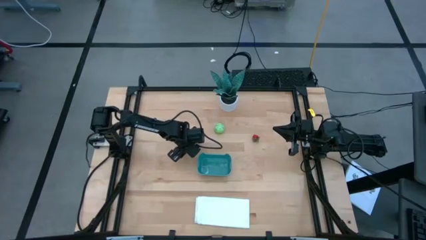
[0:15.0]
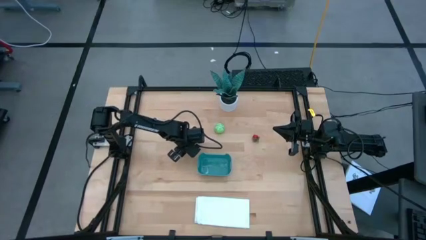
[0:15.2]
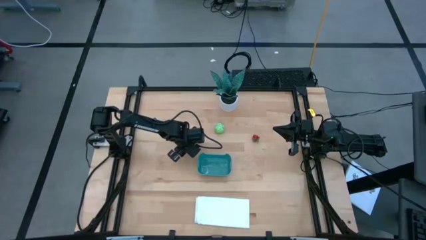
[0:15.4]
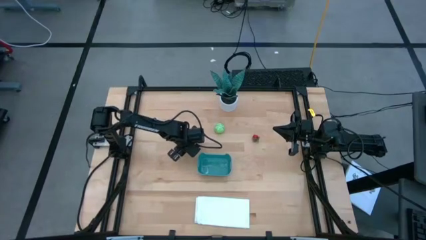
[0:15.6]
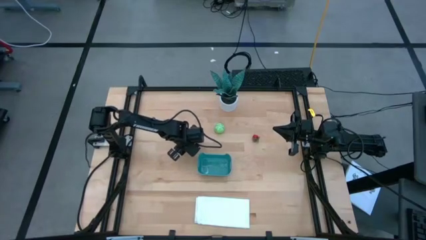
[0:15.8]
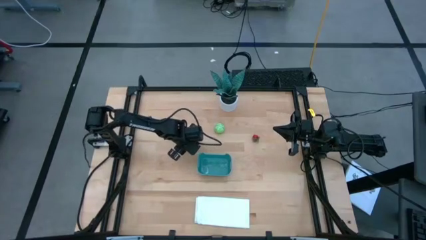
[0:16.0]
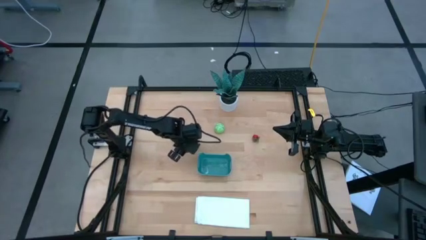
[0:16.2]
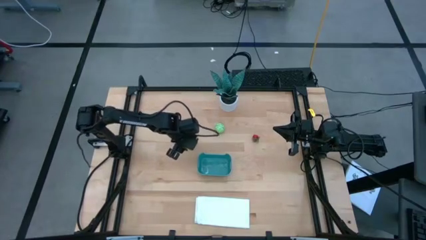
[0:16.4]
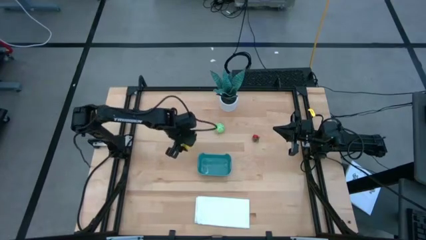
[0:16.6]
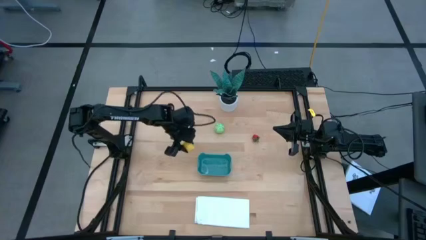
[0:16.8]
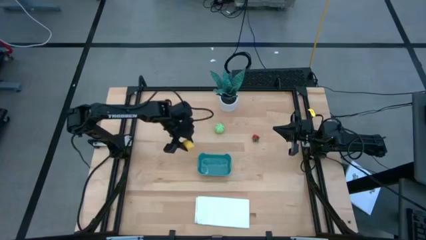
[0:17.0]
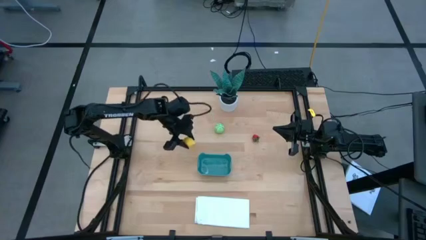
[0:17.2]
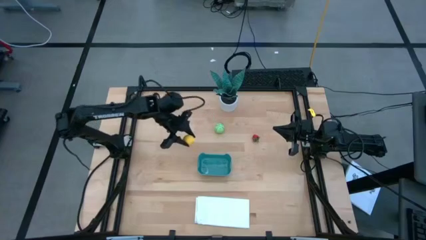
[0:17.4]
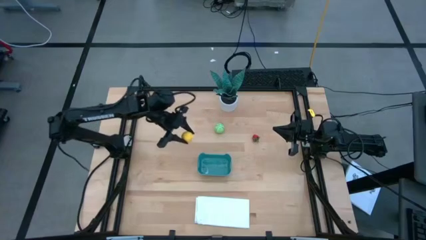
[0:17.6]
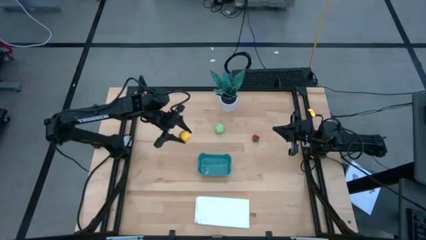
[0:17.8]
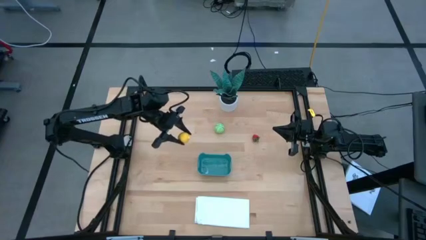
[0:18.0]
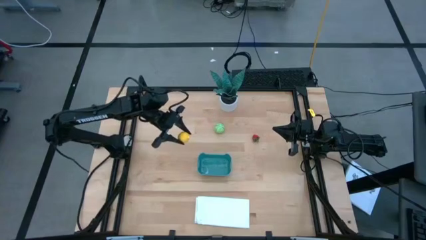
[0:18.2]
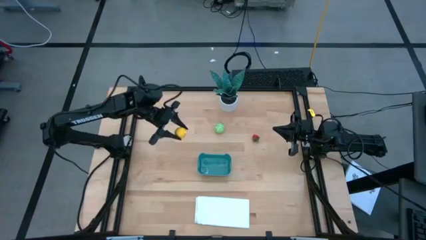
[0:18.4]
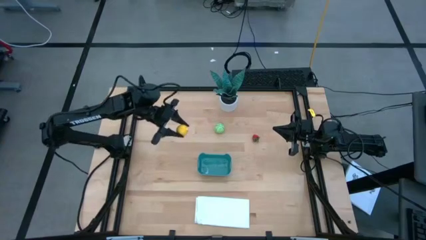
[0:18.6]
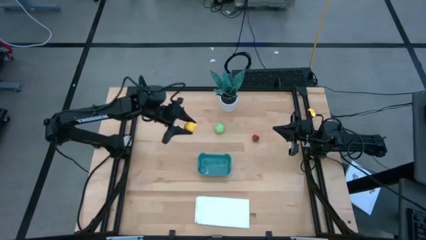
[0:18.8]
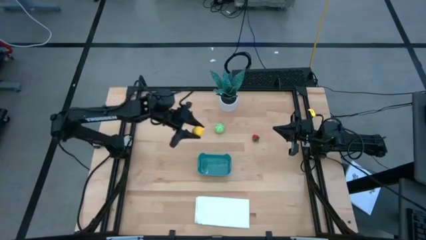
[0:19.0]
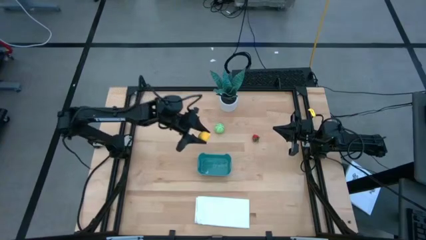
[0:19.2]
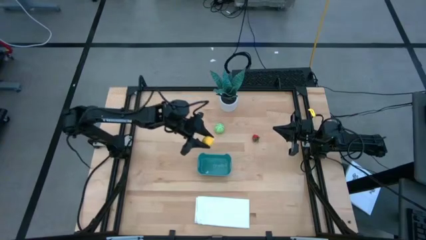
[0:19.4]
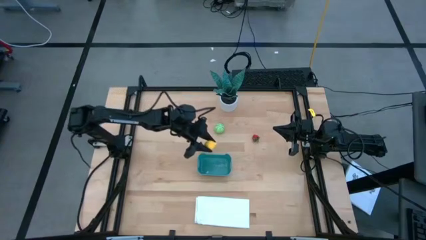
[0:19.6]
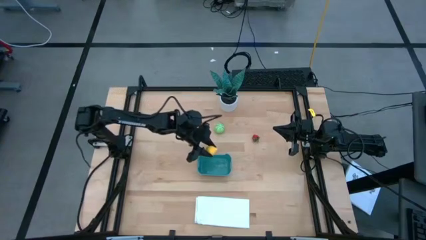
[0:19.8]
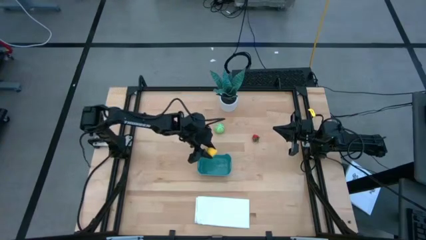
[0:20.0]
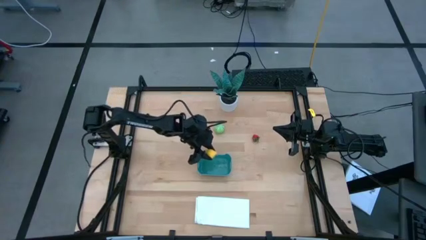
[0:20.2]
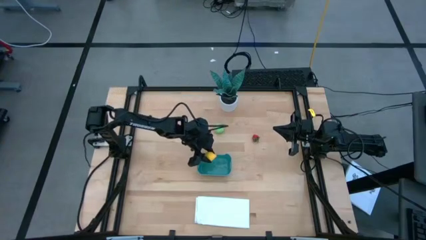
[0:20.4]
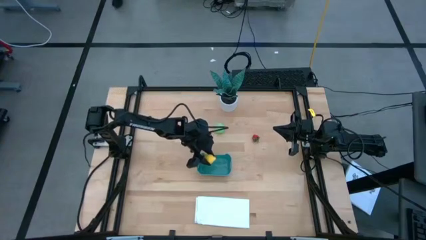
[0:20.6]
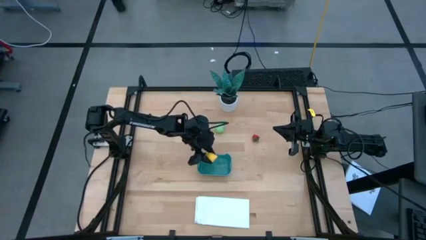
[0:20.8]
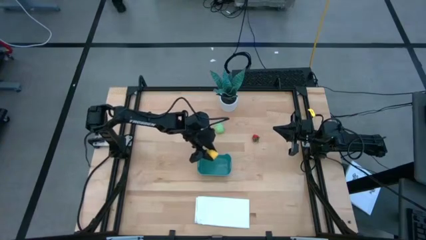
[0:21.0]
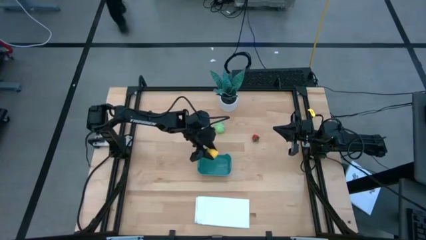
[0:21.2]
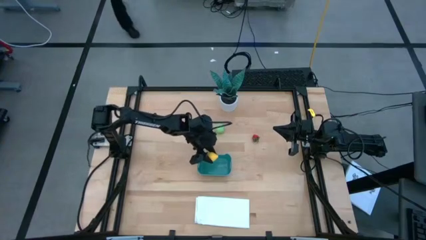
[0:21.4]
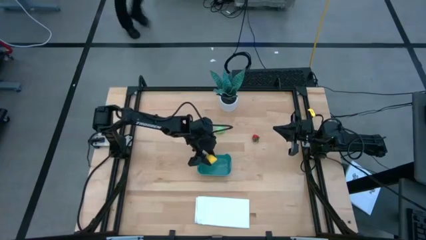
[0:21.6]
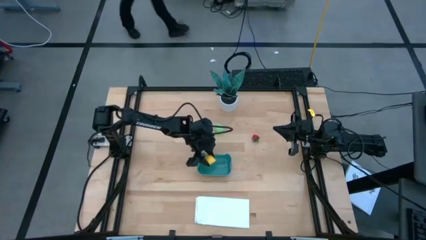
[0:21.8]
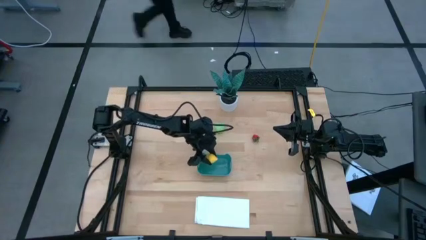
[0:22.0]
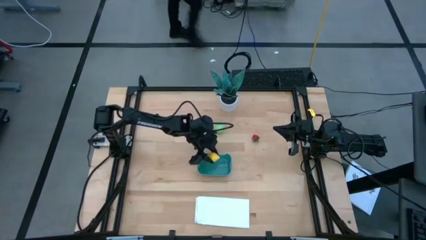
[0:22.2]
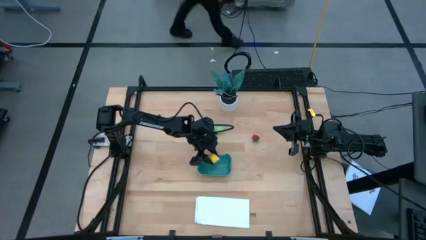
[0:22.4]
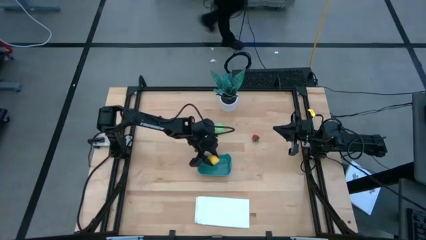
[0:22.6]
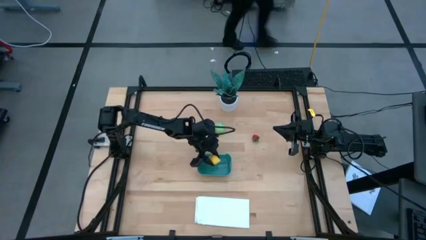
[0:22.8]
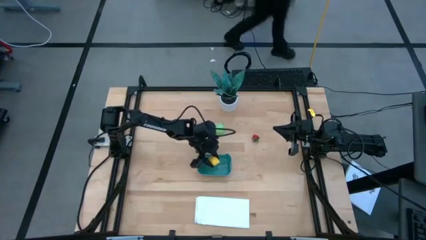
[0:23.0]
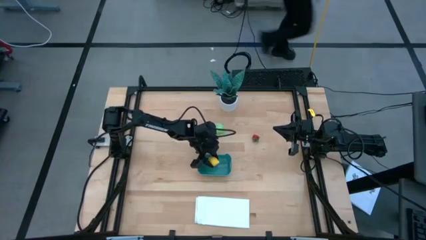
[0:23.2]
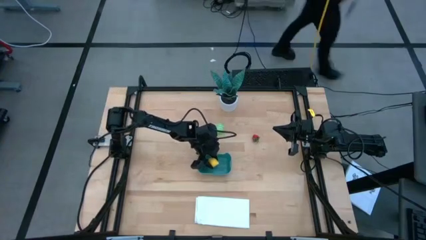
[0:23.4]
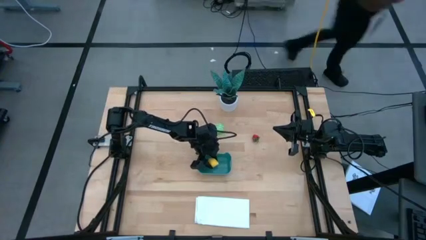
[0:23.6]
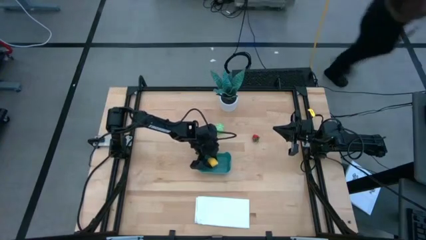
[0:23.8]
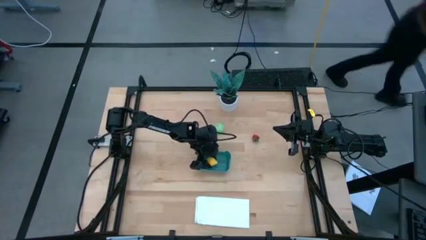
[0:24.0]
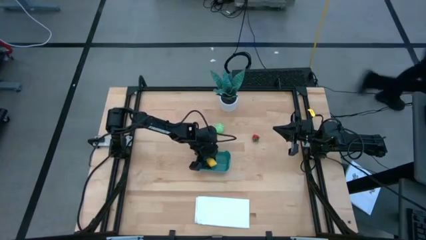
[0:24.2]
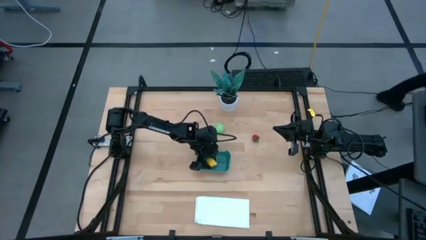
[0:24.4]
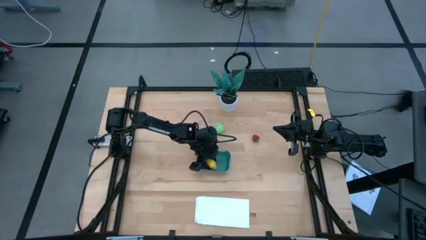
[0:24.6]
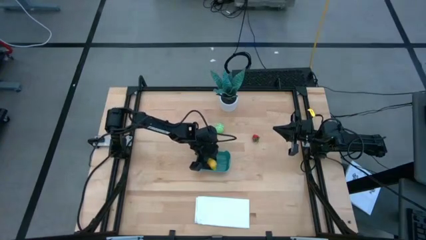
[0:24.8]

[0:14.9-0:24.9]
Task: Pick and placing Produce into tupperware
Put the yellow lemon into the blue basket

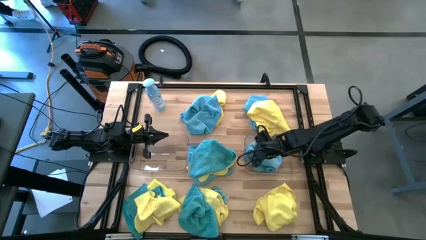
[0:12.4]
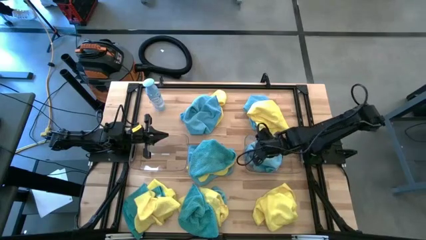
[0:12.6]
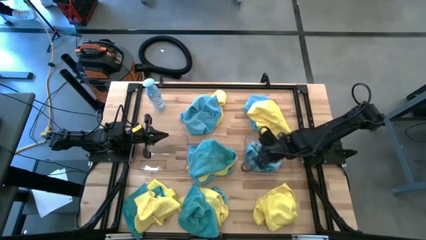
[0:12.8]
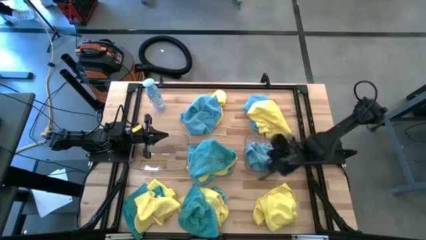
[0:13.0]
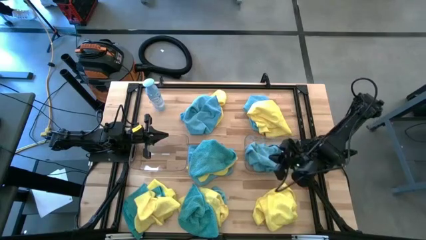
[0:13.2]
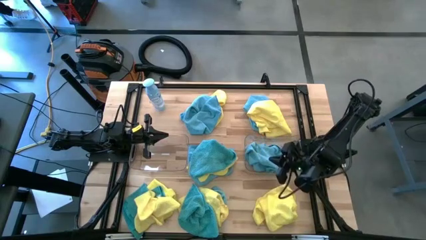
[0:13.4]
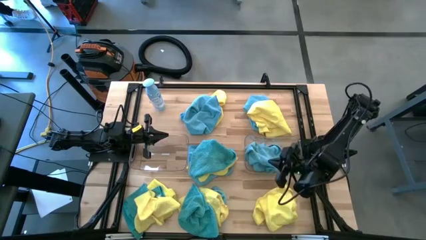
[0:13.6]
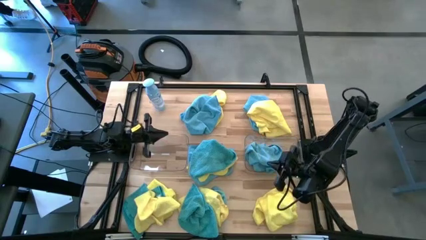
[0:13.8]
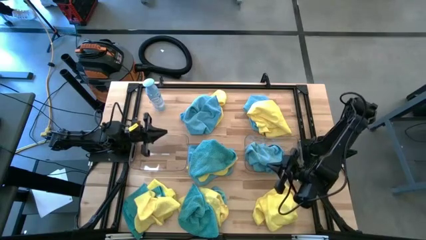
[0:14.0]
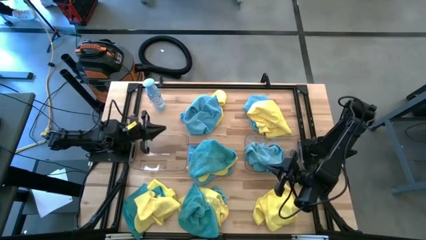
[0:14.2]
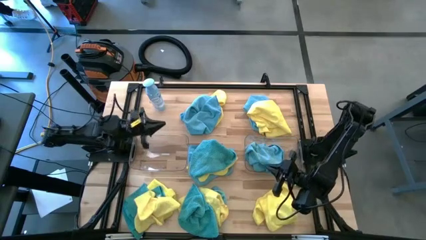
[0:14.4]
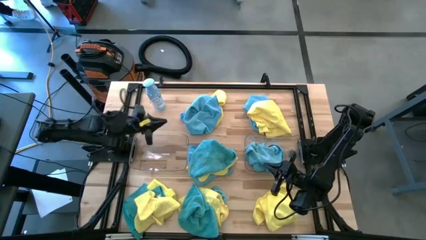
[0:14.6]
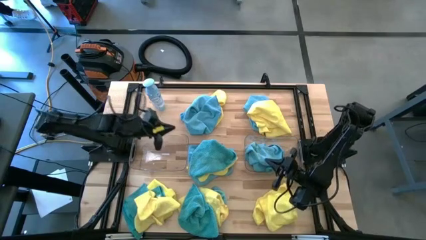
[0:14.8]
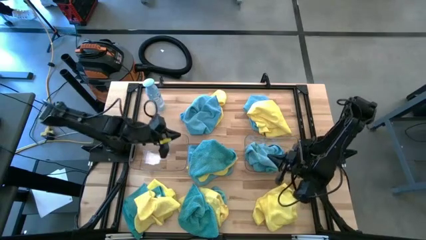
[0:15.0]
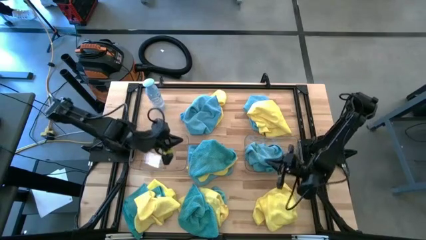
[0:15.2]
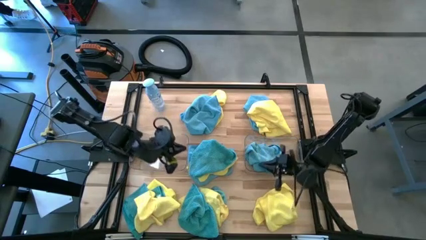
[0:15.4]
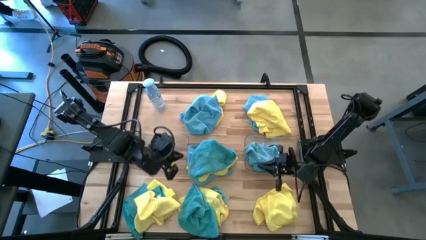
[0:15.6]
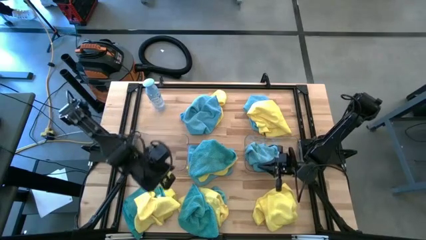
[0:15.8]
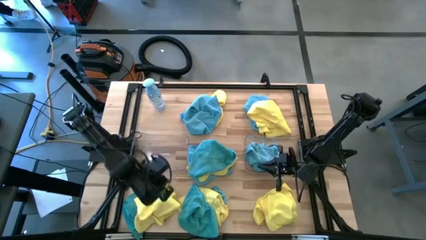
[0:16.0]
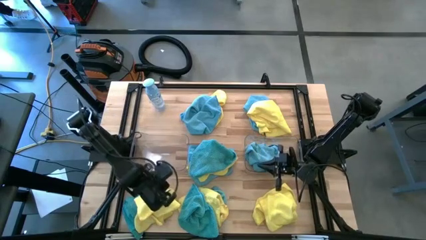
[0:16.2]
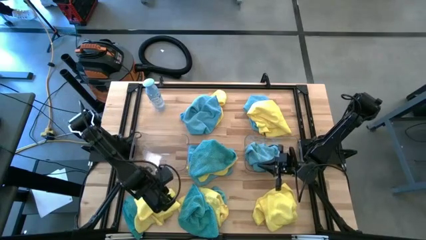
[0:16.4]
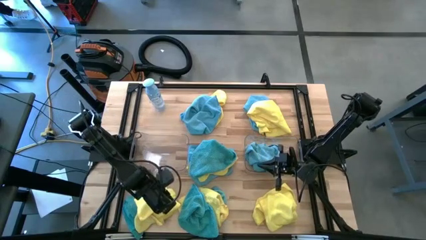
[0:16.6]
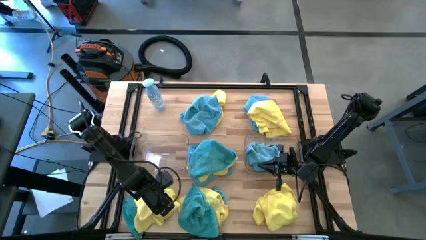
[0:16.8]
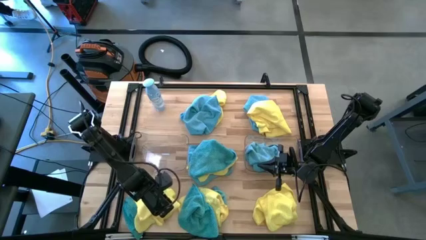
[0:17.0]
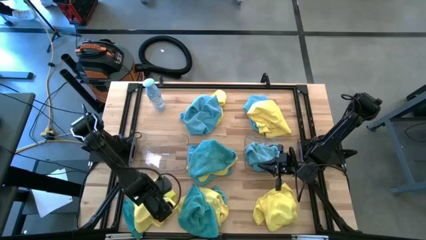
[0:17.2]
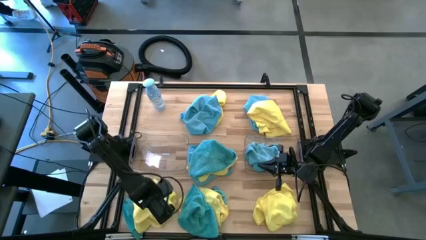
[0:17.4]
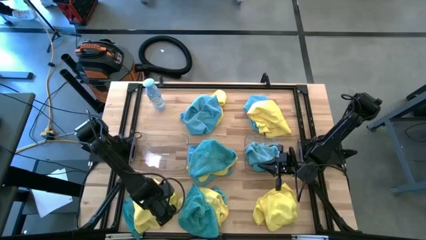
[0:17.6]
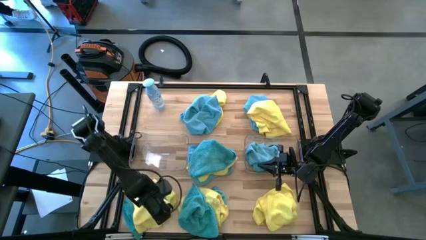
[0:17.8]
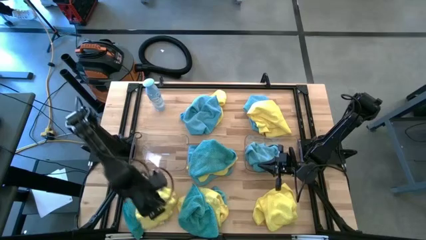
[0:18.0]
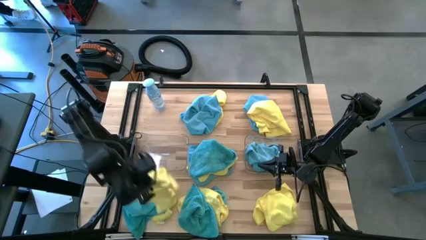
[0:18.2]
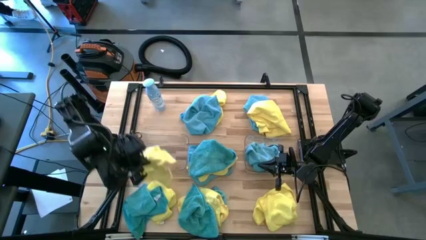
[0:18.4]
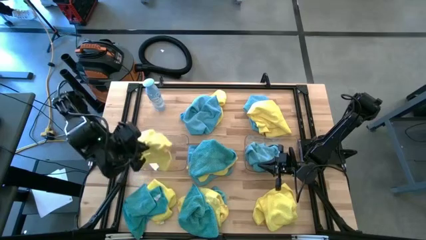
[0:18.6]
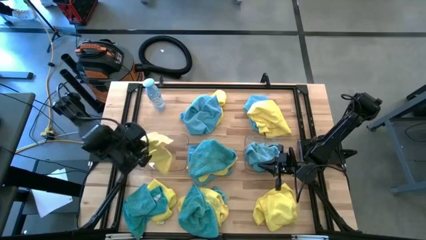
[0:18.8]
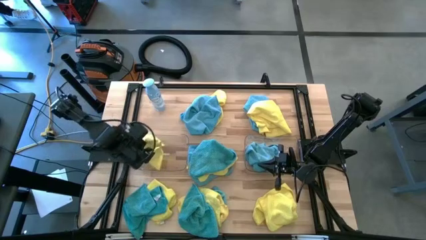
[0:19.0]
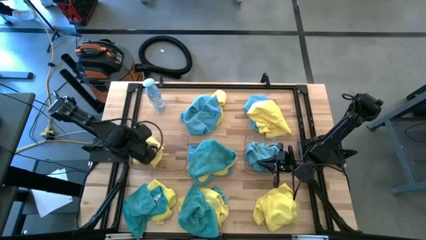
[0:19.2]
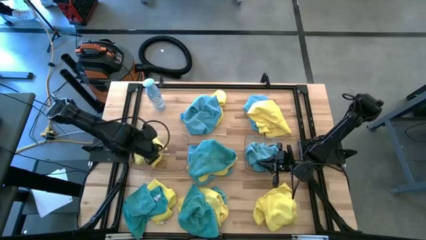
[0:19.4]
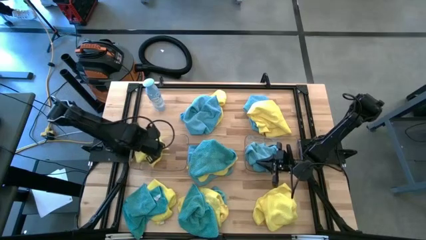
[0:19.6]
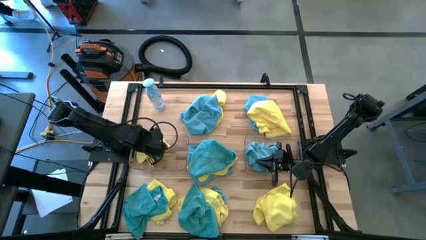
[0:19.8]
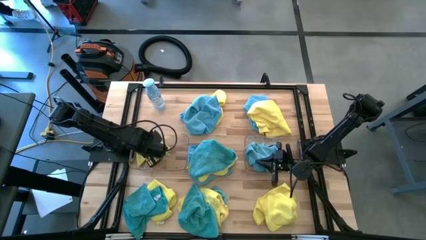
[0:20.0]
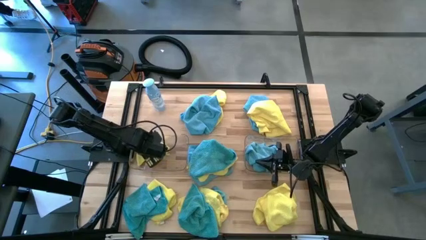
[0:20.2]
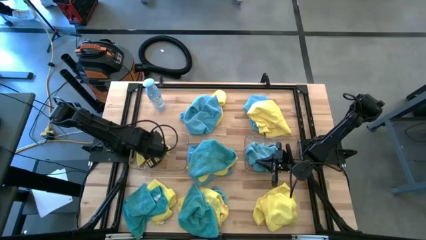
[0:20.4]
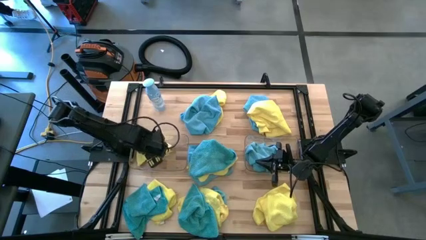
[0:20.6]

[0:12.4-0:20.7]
Task: Sort microfiber towel by color & place in baskets
Put the yellow microfiber cloth into the left transparent bin
